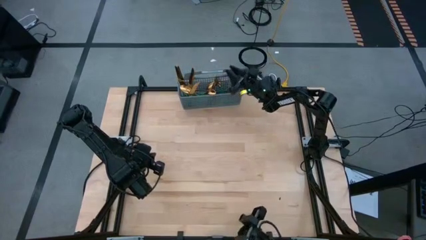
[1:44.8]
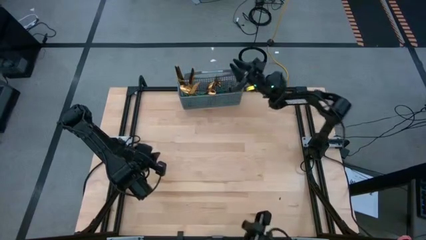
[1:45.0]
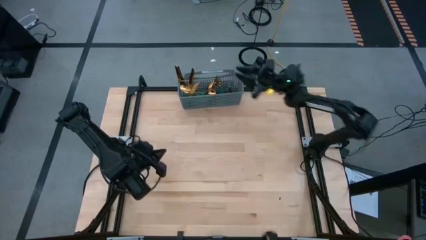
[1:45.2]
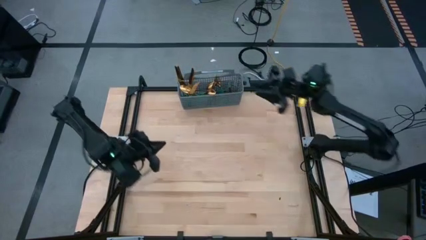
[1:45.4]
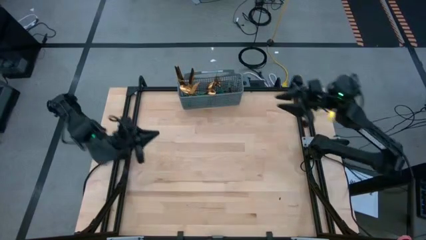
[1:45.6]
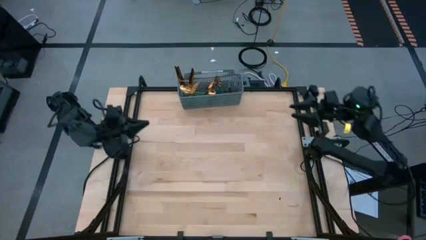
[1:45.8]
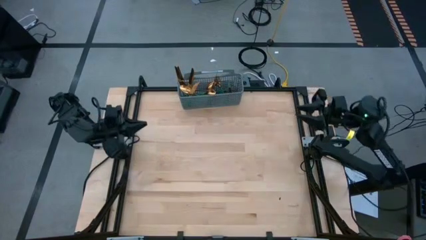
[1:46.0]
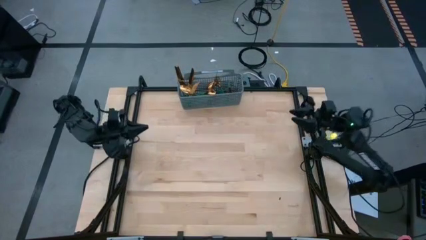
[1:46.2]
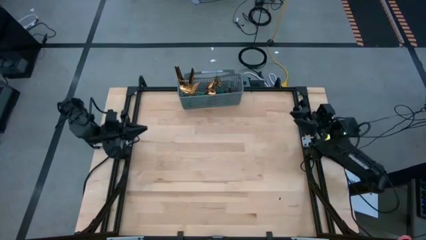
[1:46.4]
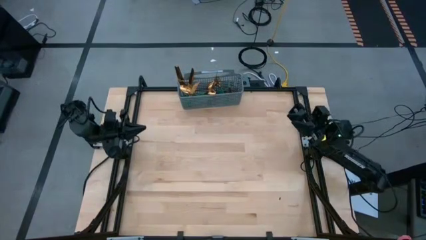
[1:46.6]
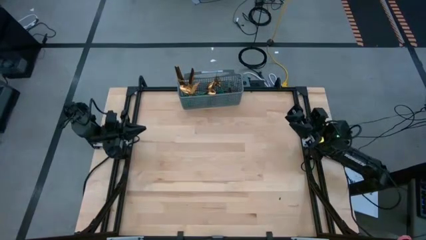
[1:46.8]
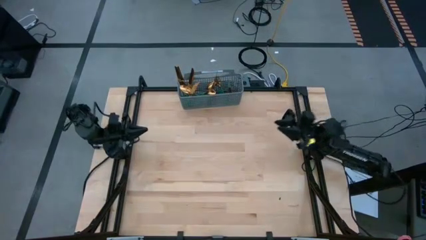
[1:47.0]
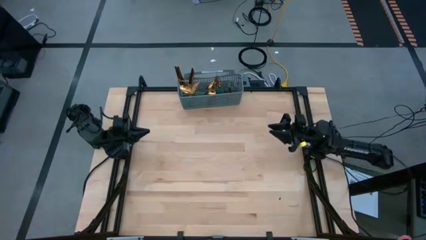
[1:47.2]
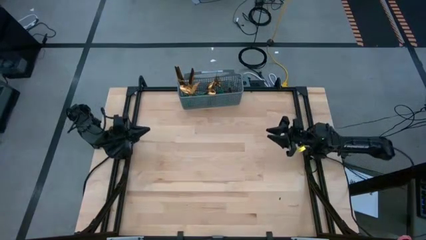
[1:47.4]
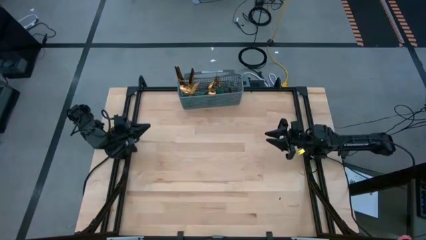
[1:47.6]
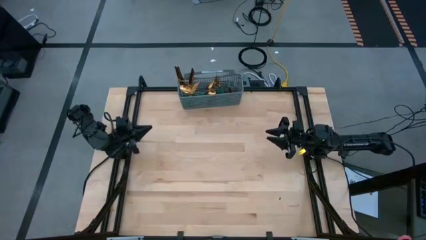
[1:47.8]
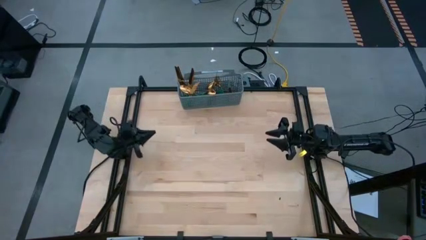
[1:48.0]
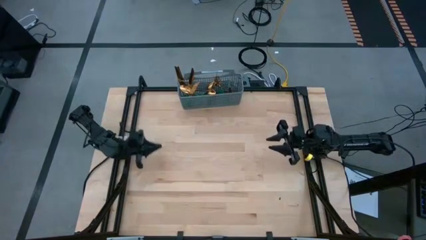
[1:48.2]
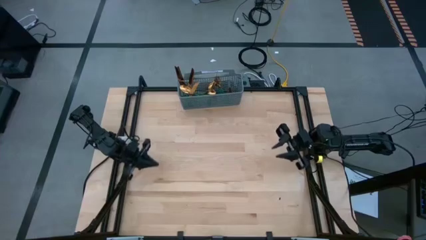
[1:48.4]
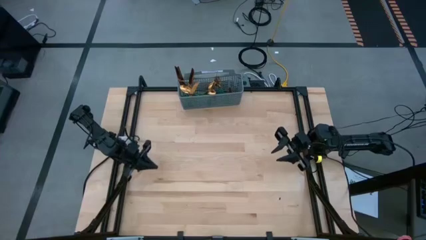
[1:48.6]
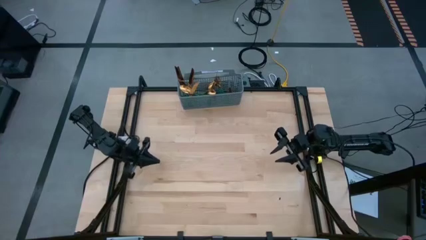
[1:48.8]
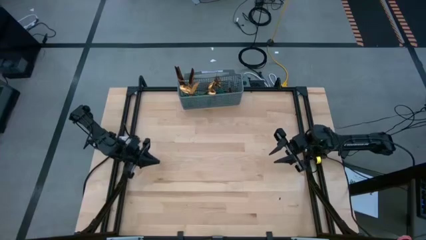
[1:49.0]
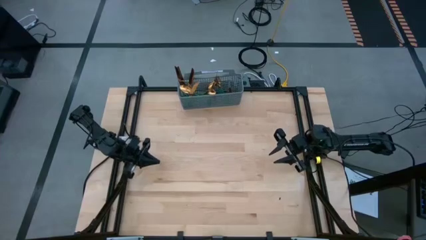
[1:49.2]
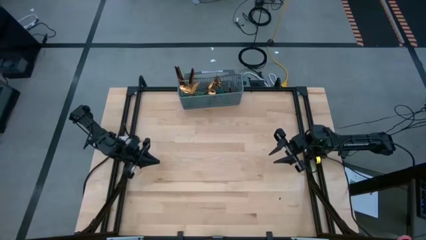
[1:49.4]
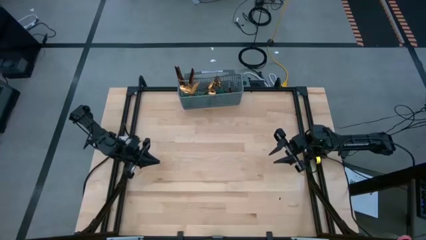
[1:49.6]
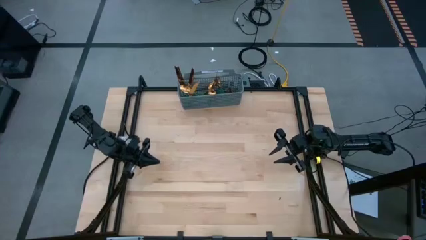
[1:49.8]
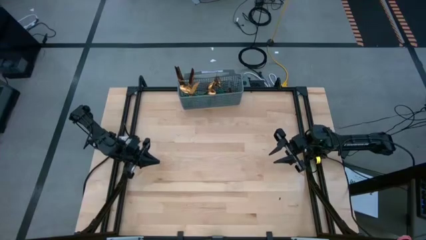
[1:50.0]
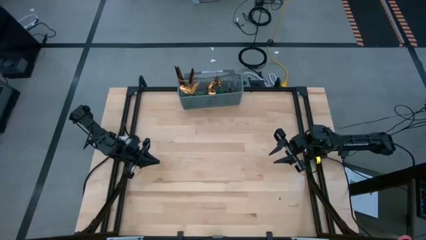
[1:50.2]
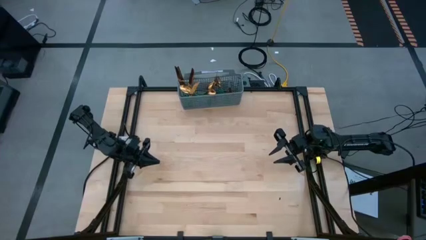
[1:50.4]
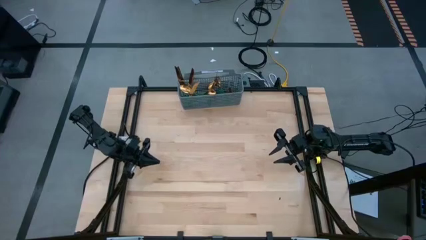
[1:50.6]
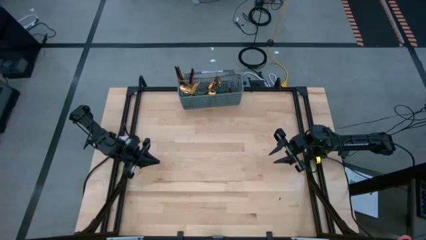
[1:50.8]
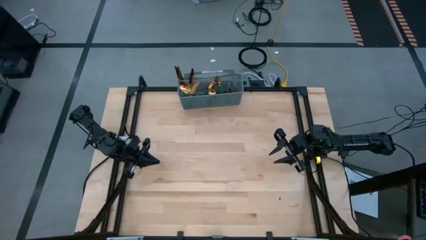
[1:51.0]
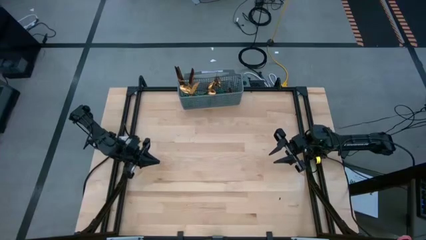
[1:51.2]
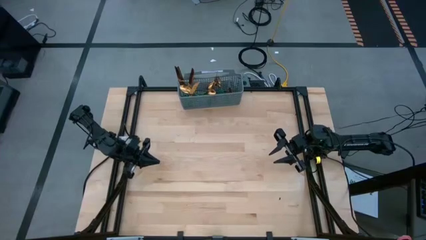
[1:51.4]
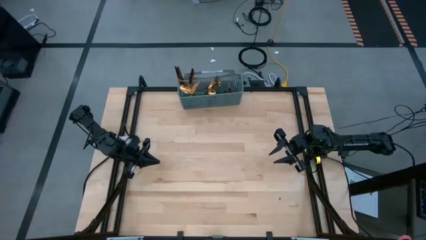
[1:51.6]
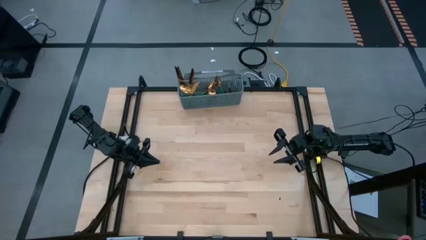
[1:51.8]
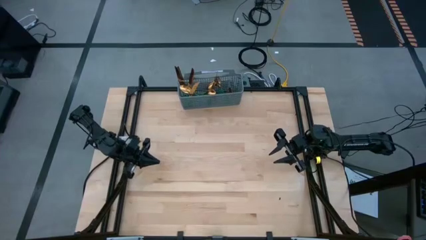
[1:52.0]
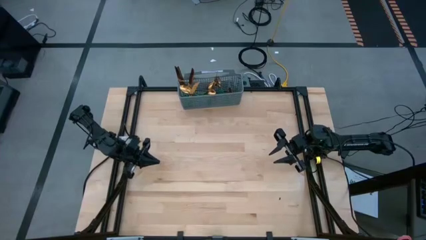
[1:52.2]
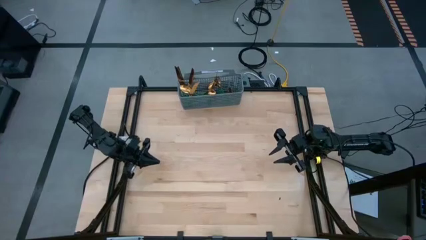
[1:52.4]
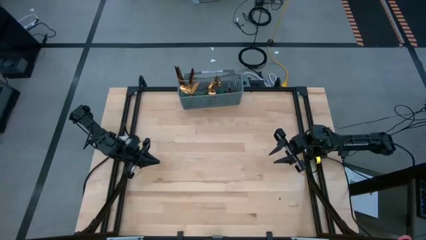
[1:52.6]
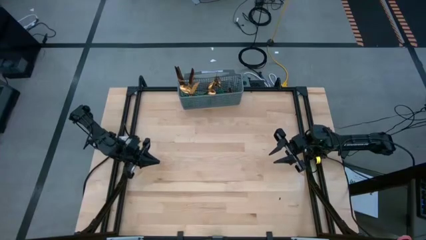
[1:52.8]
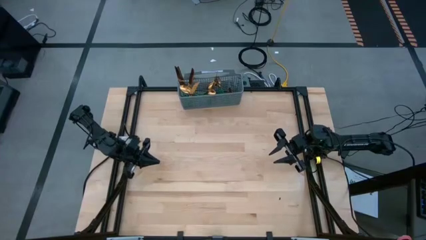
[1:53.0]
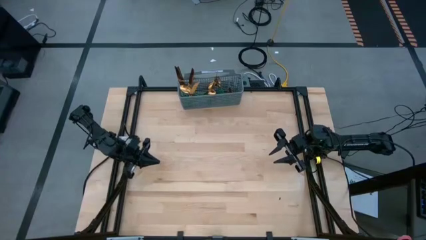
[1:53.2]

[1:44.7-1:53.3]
Task: Sort silverware
Return to Home Position

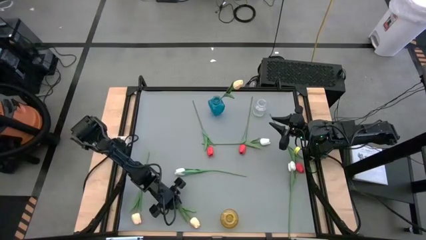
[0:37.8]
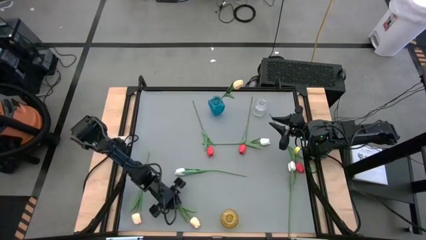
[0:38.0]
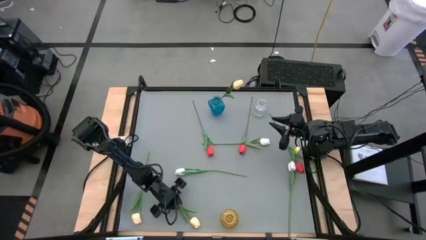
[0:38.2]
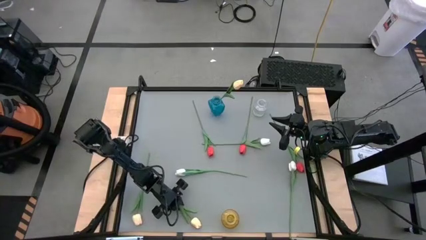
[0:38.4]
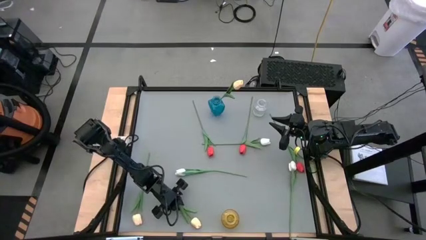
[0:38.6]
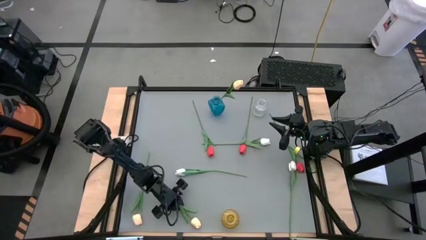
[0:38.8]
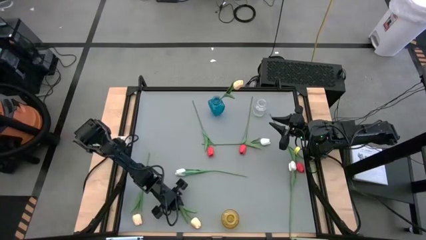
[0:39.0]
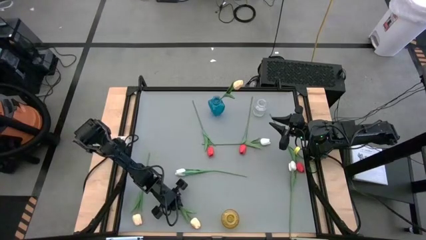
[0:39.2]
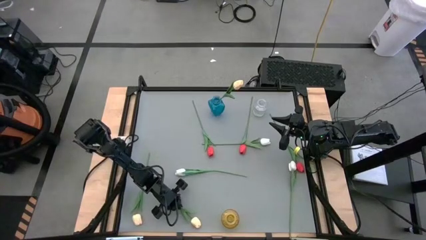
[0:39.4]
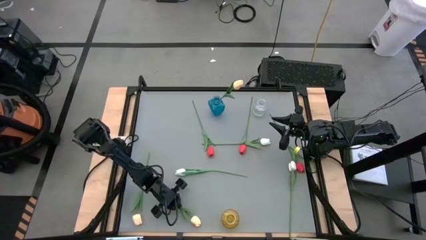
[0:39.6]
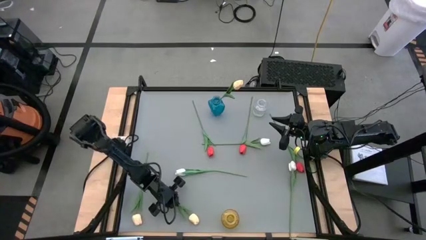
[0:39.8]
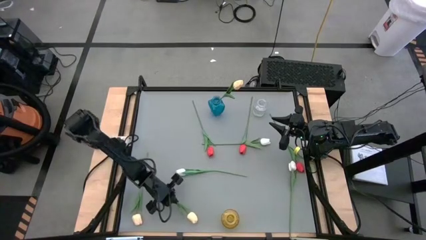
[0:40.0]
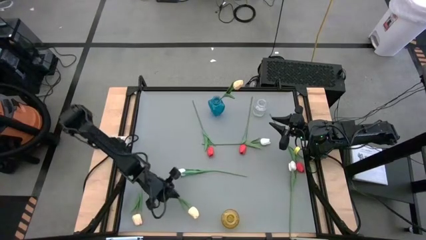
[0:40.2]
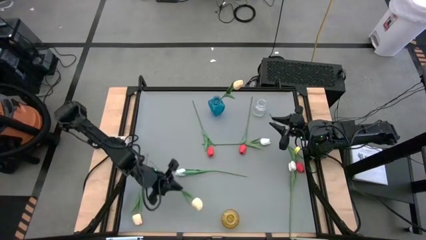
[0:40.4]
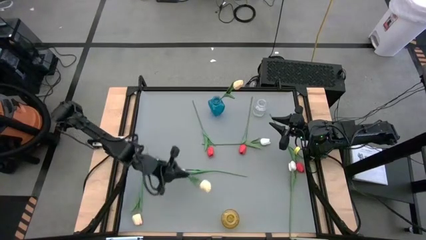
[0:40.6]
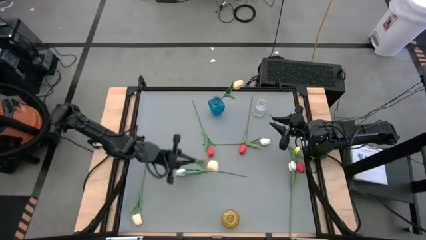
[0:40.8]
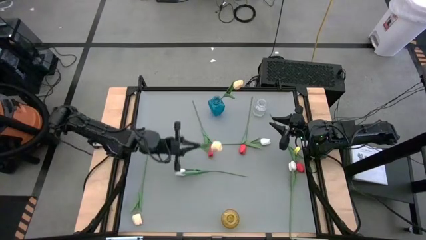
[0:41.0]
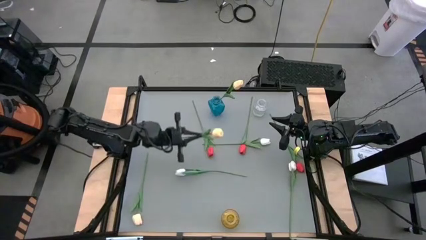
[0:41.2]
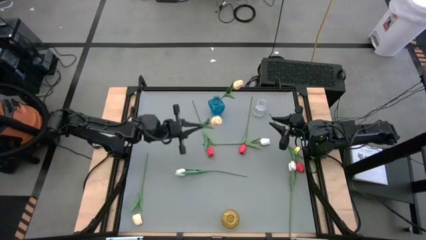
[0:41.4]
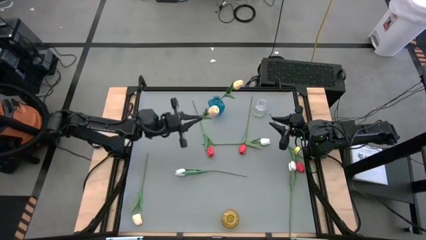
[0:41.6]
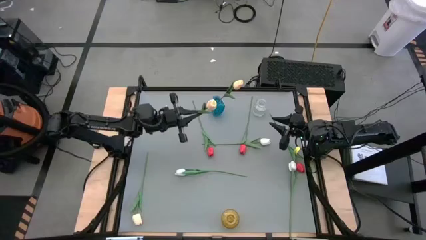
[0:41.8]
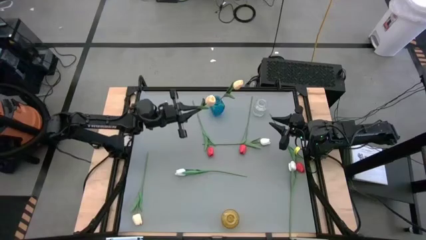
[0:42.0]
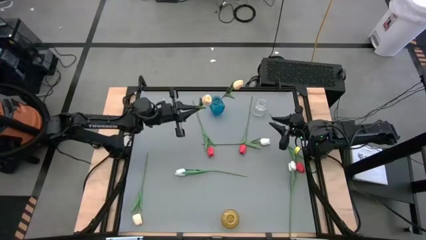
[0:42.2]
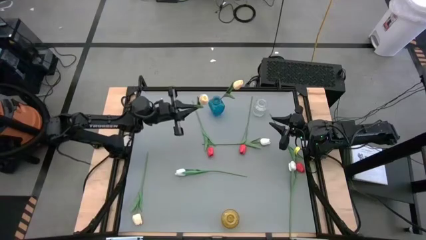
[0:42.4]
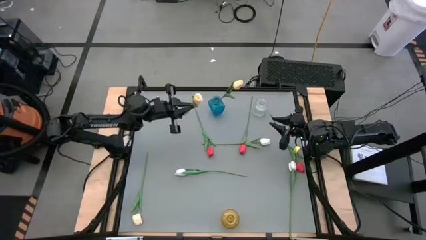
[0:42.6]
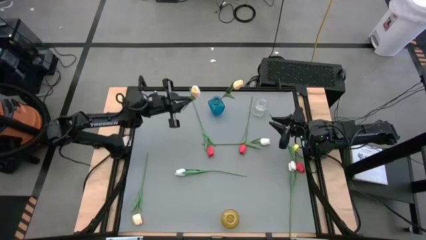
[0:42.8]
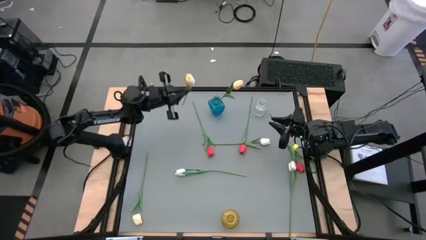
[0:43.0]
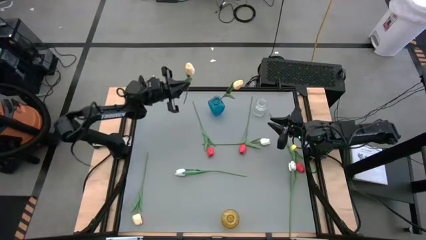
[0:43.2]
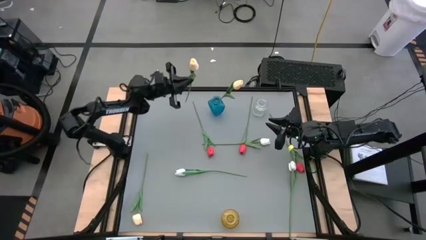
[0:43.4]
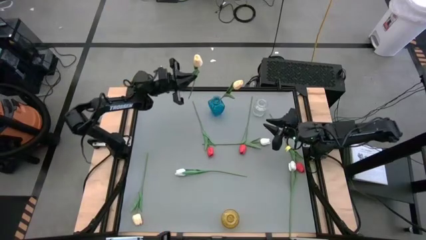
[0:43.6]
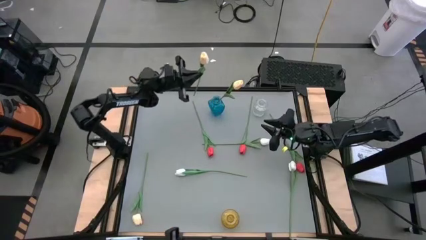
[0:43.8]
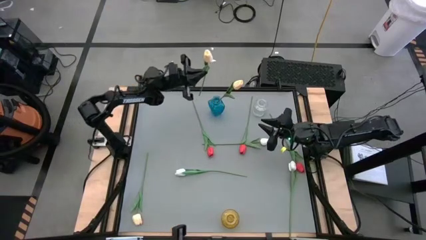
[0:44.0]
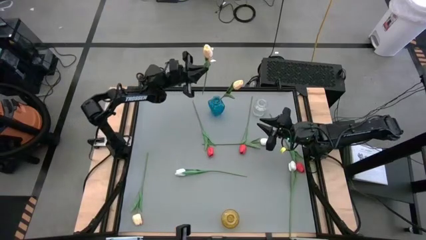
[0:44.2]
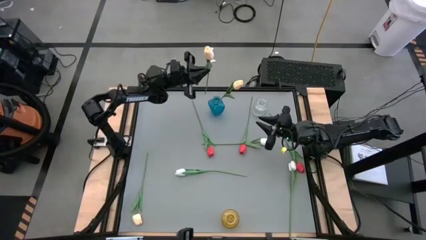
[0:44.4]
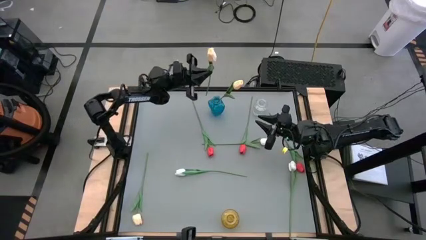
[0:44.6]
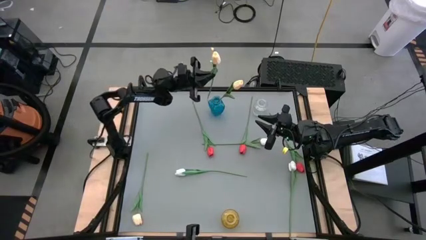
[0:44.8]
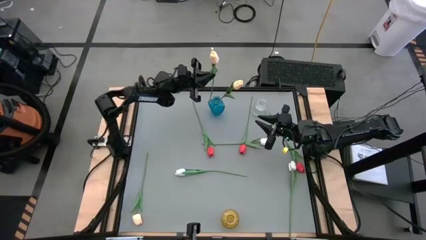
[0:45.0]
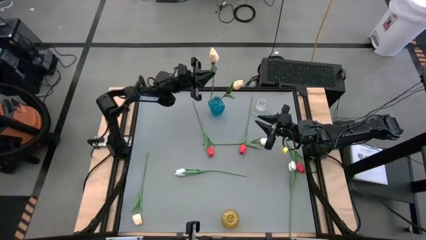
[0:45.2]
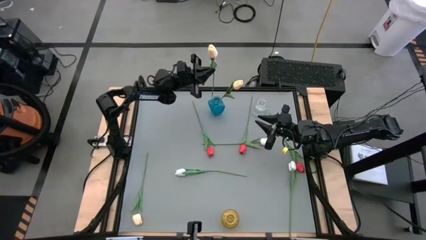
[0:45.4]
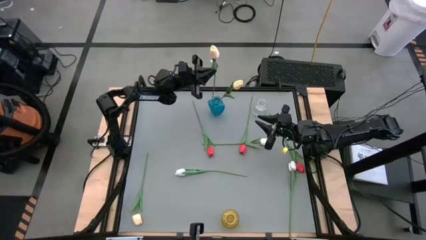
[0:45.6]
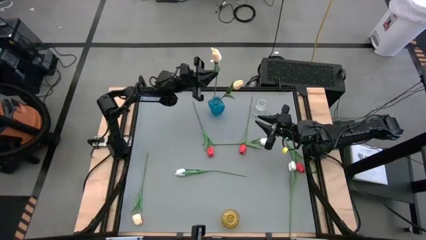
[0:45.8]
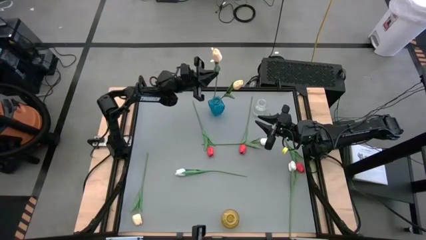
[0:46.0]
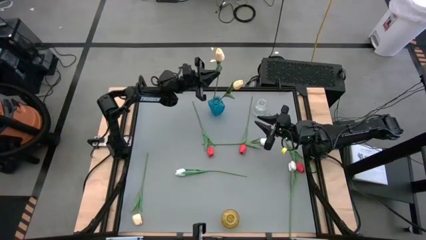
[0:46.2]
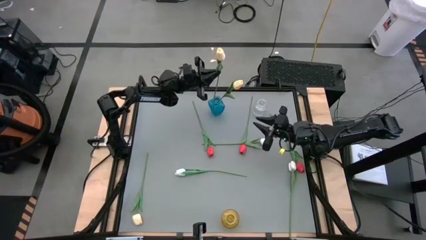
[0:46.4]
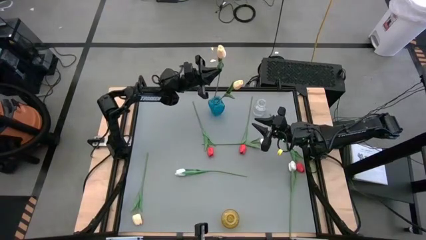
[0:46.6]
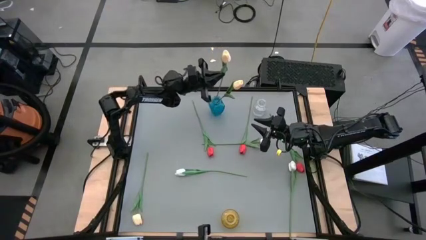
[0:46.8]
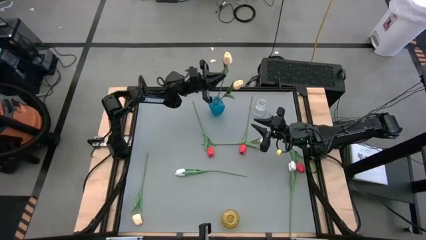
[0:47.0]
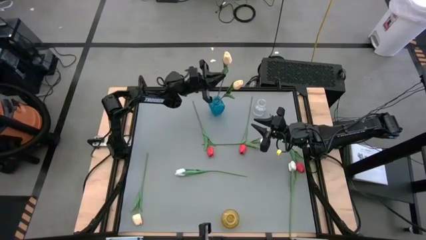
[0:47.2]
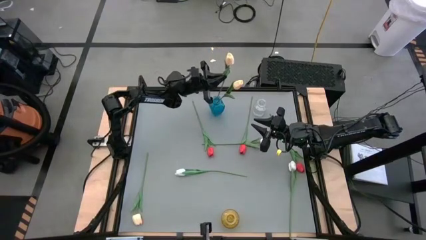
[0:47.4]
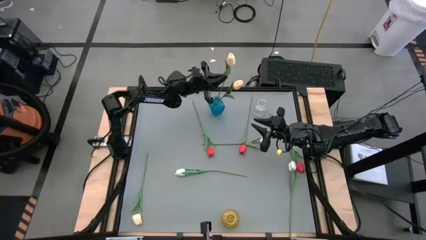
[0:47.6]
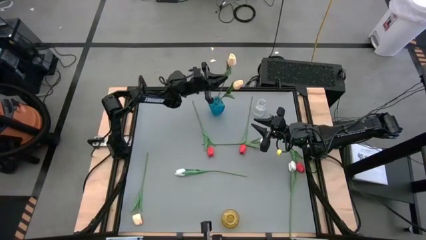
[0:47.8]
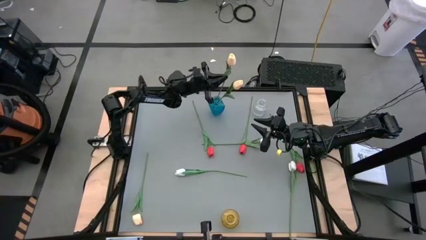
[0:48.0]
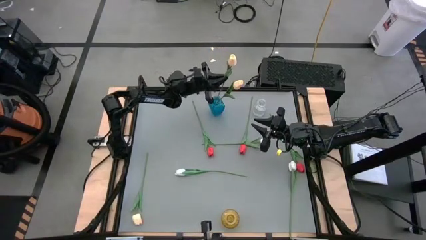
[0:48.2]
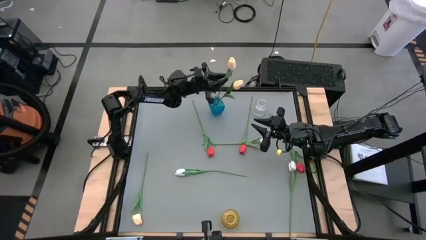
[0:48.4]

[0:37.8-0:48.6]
Task: Sort flowers into vase by color
Put the right yellow flower into the blue vase
